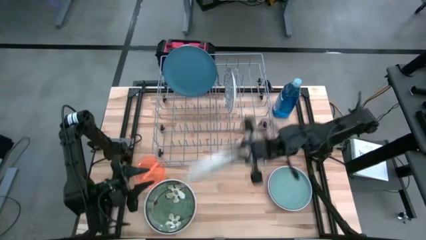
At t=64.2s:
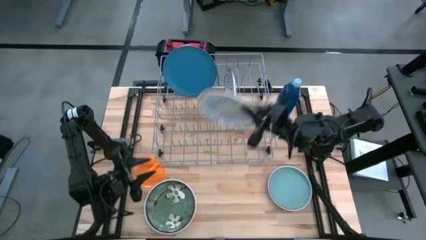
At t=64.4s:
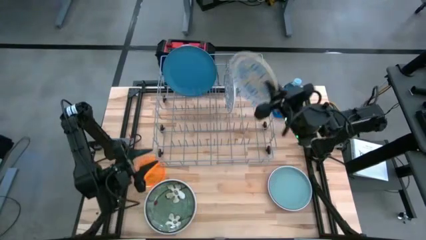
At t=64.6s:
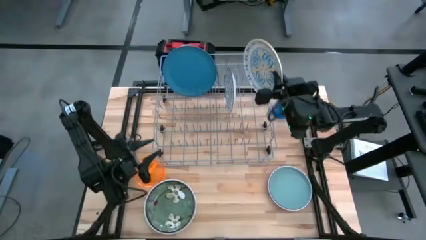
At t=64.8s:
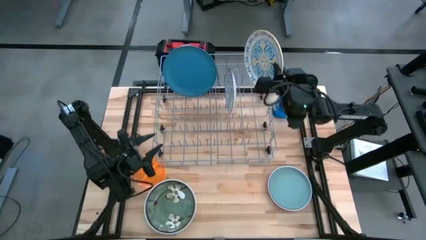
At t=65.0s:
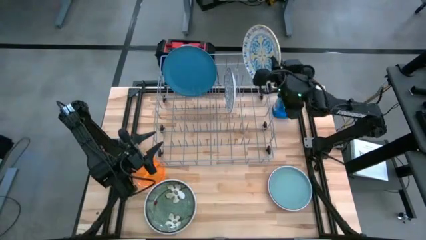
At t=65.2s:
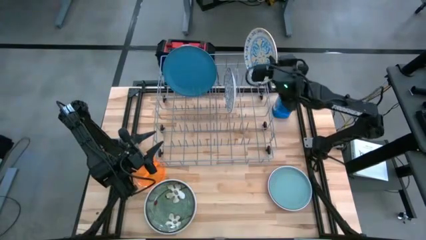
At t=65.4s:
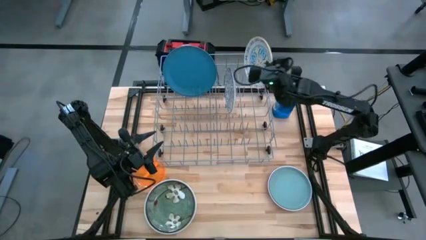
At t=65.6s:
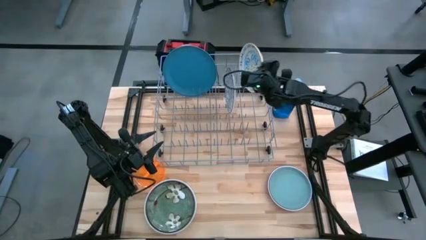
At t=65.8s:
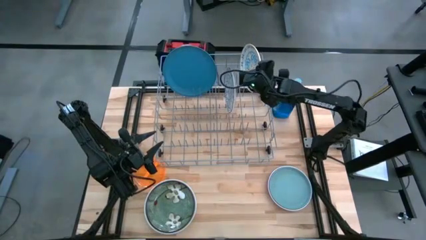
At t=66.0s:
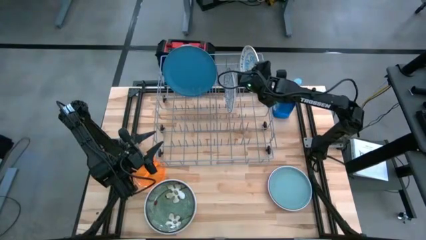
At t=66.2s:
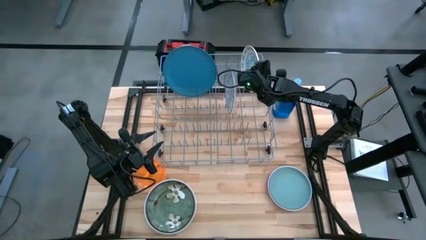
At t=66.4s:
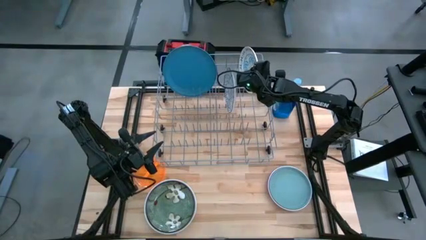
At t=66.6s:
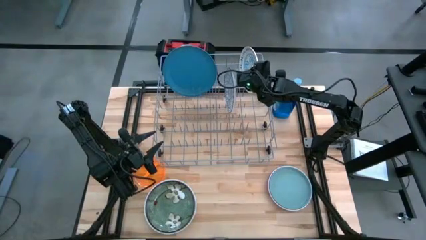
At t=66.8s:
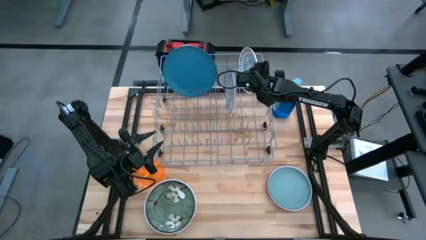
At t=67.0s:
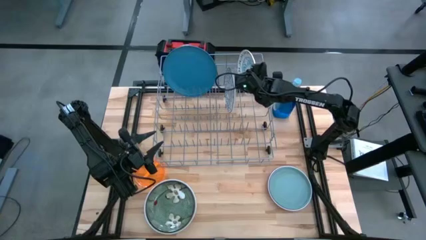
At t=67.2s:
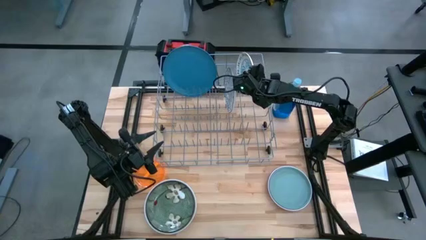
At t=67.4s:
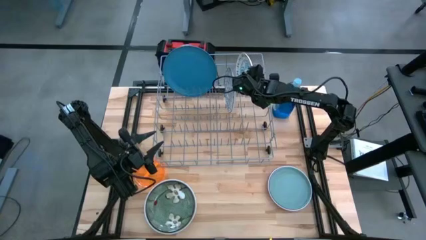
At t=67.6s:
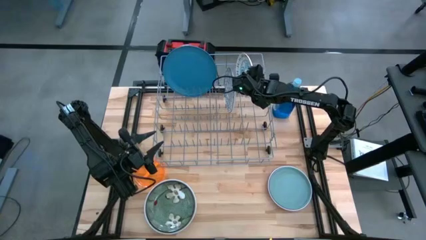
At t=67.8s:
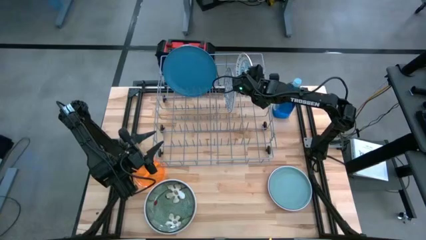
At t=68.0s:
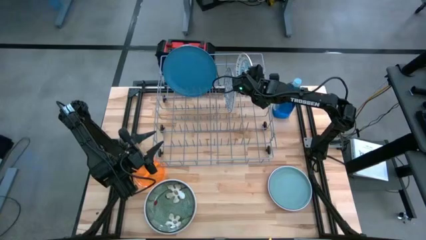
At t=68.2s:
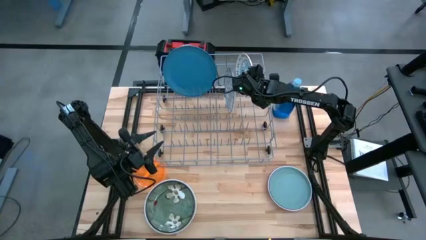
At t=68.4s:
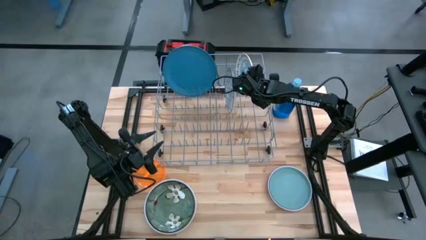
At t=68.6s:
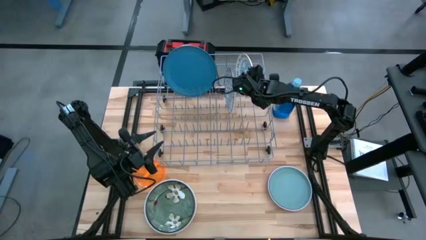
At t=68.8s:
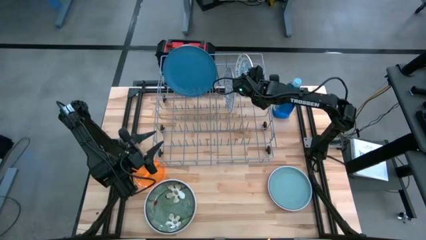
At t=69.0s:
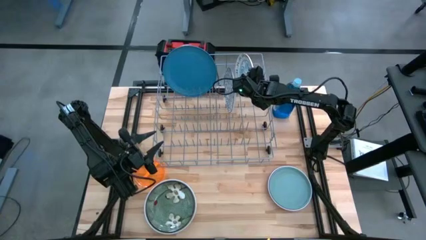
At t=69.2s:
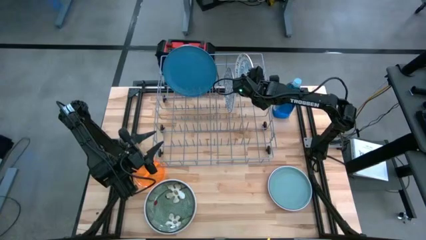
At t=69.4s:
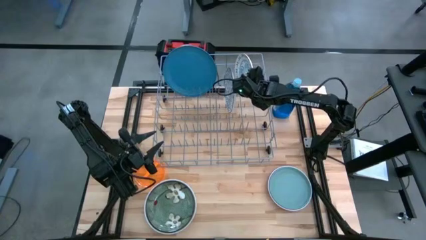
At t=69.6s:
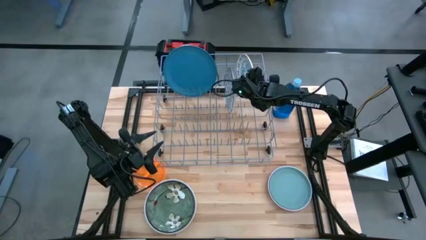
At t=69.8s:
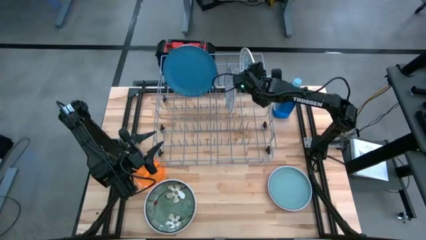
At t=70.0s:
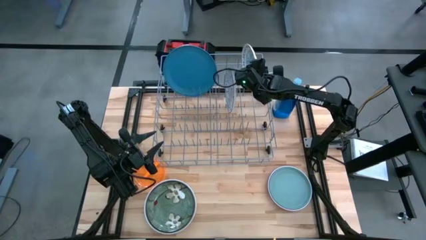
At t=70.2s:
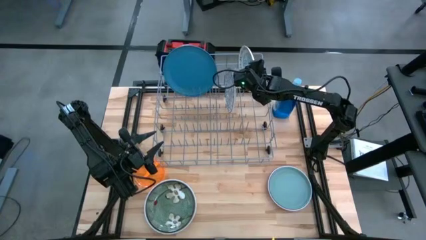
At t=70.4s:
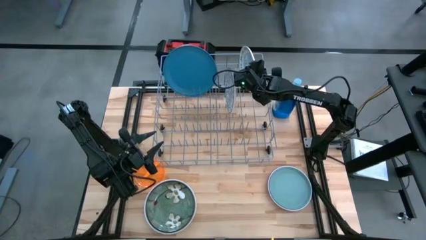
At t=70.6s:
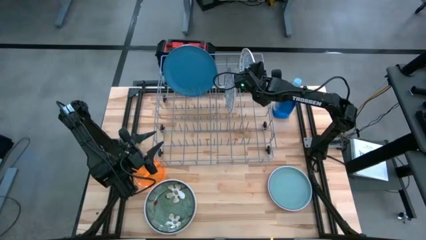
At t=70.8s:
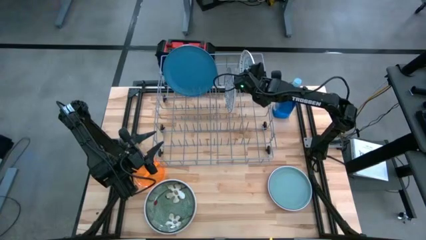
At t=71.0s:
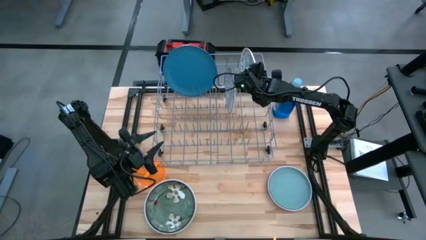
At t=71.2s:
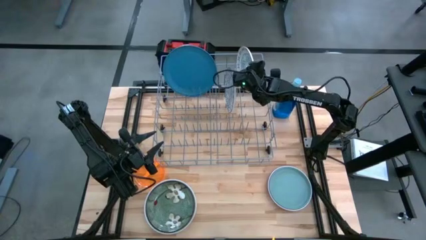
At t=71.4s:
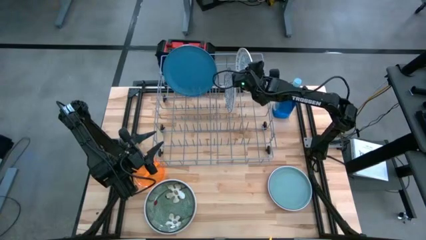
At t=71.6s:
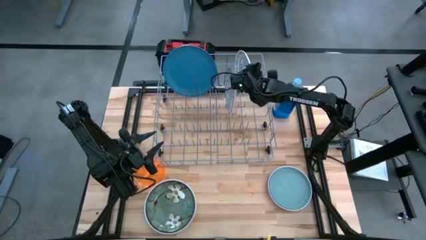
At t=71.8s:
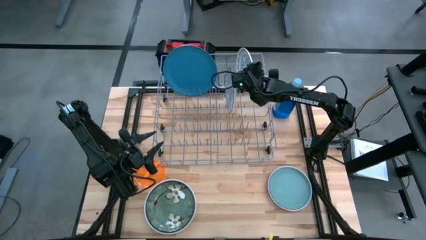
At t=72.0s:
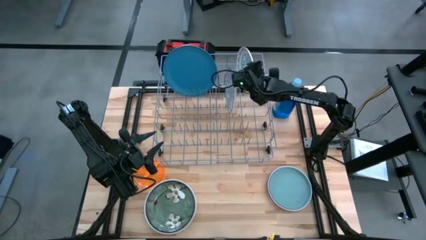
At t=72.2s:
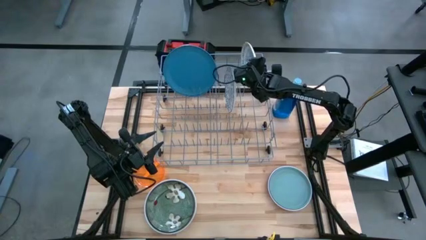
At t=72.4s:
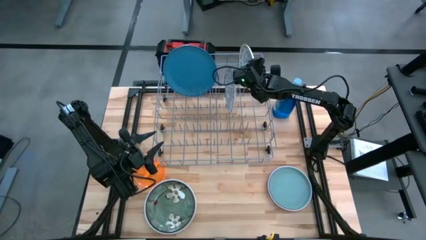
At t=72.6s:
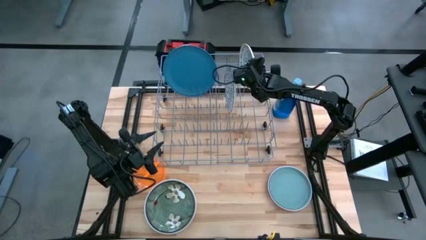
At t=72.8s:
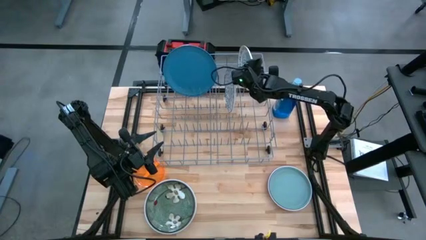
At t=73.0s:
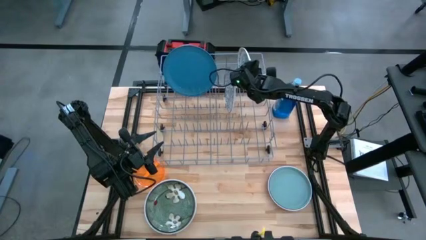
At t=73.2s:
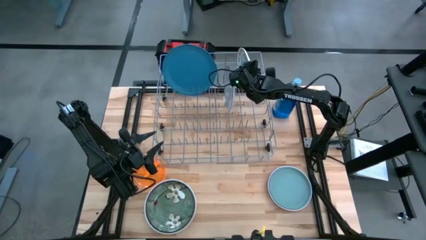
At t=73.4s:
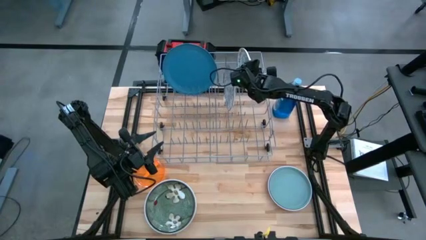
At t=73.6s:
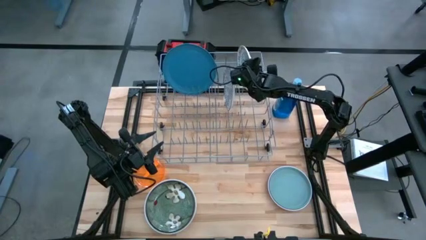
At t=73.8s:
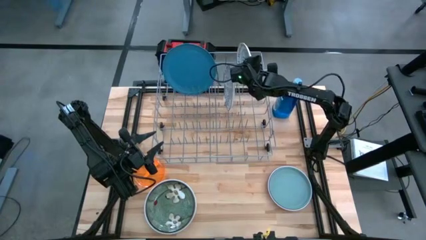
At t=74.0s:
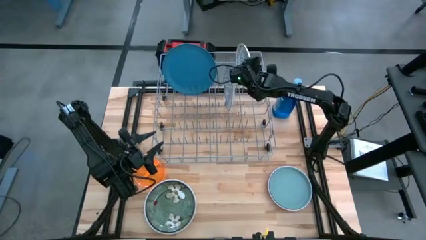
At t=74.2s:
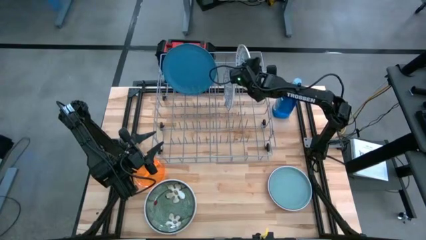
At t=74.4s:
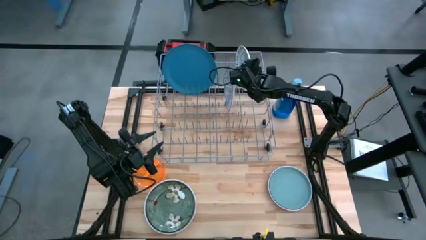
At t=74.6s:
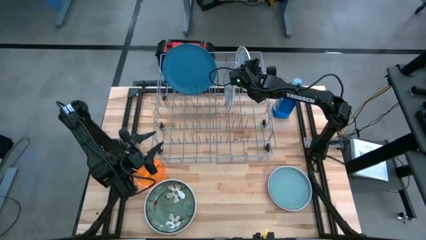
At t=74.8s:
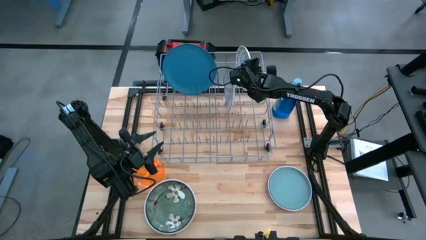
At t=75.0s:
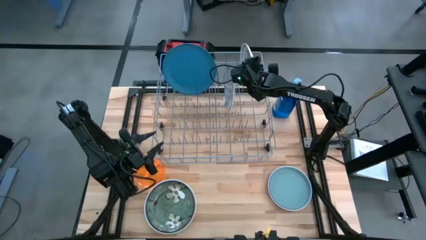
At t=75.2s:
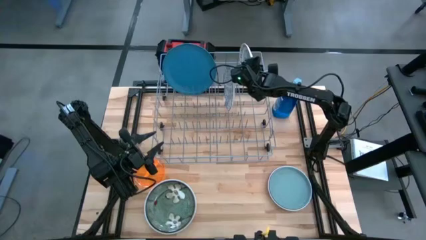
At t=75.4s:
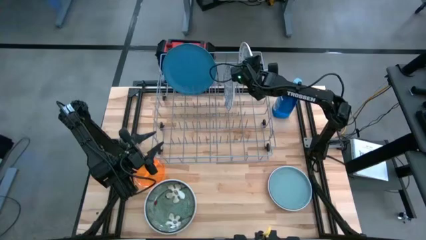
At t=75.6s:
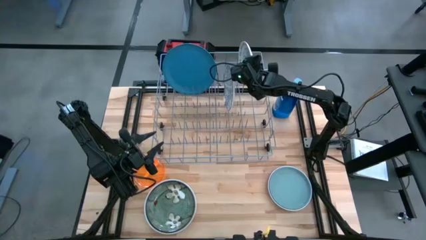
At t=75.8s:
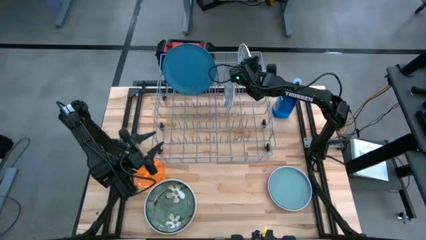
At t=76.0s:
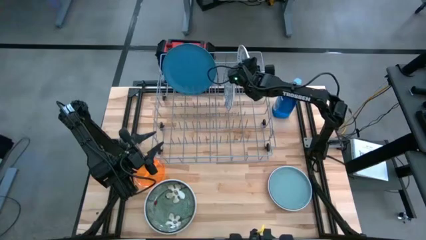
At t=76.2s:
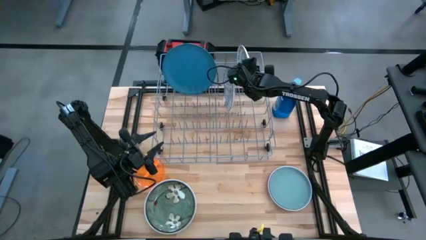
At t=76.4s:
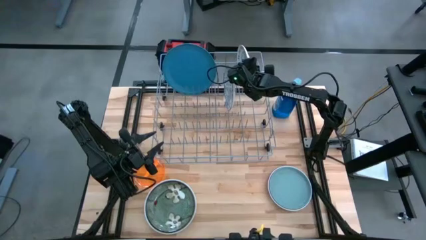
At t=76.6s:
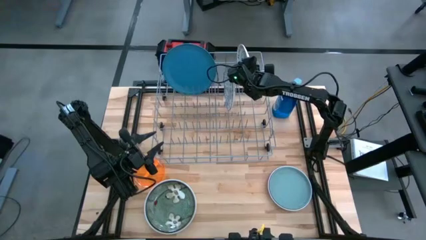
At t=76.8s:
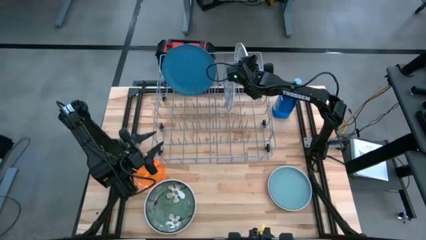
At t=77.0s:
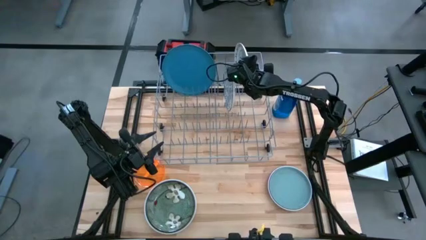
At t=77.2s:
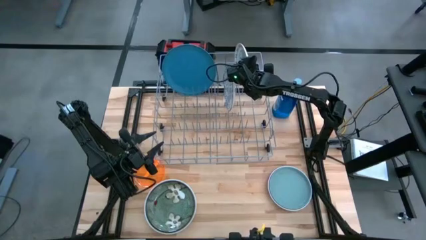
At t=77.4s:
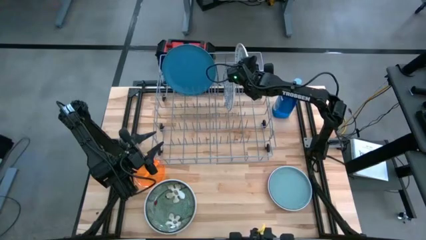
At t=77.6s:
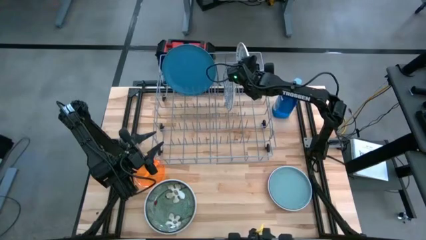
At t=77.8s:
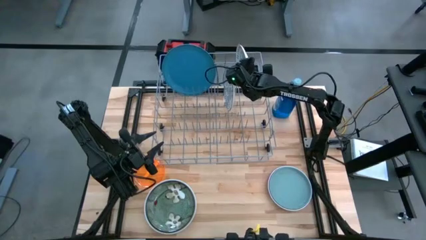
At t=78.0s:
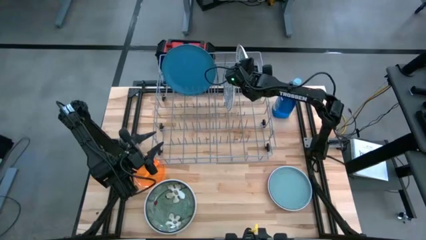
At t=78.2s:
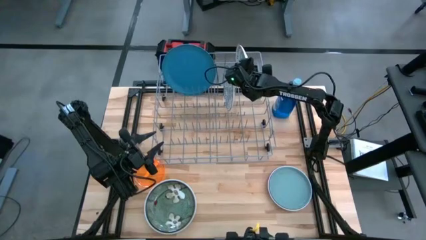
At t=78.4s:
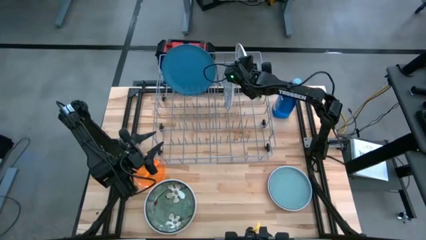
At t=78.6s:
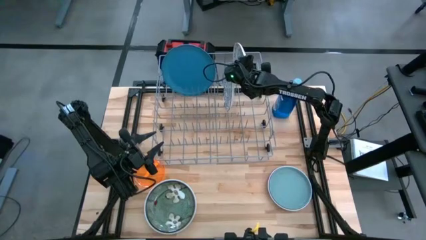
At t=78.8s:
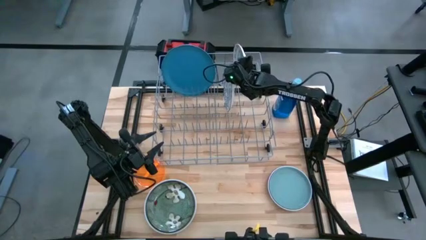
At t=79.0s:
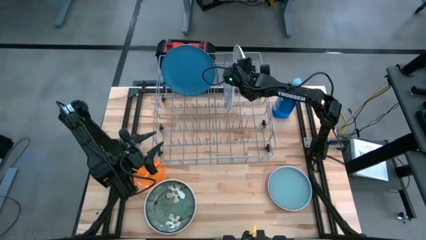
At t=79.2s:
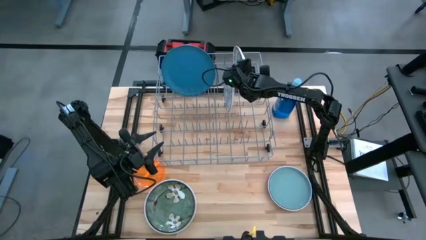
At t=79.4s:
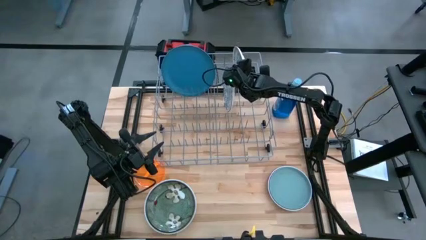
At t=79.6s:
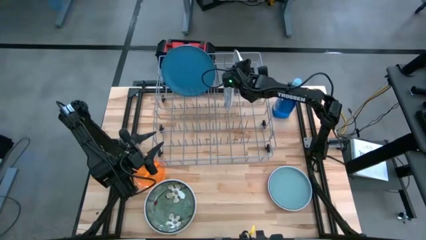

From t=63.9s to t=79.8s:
Task: Sort dishes
Put the white-orange patterned plate in the dish rack
